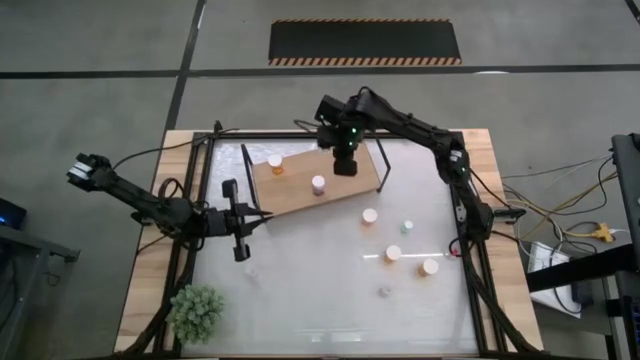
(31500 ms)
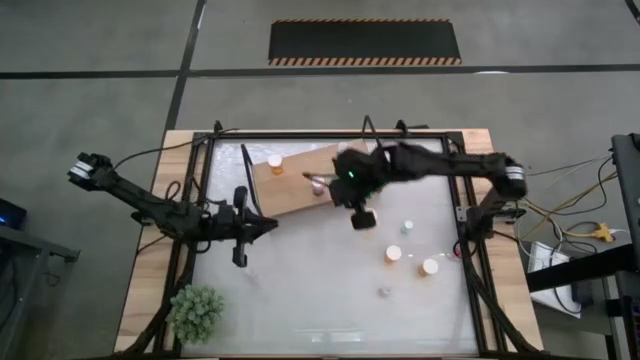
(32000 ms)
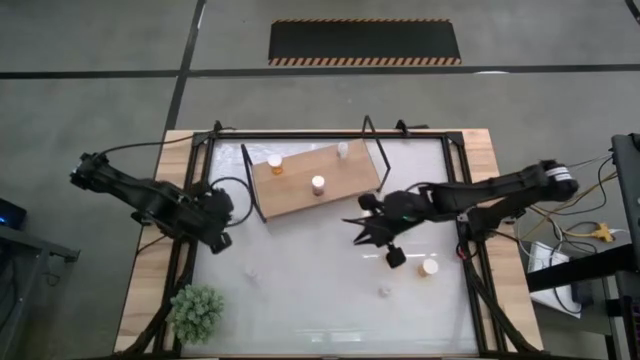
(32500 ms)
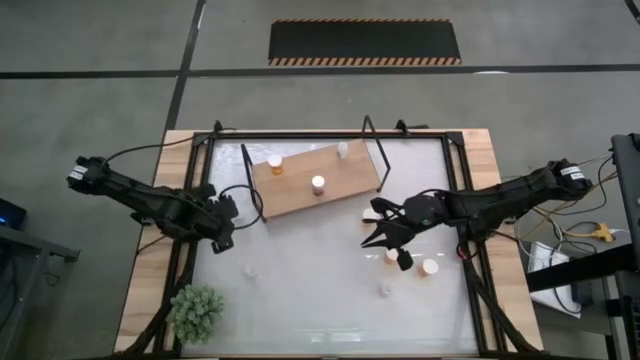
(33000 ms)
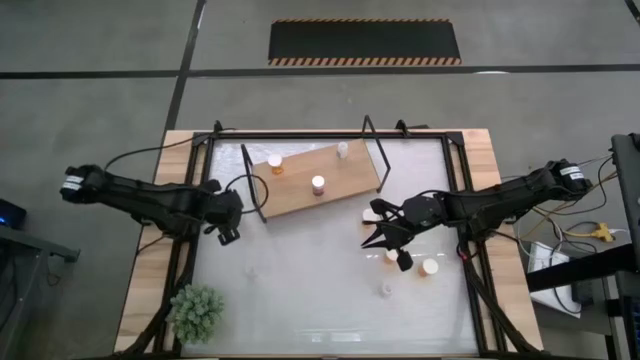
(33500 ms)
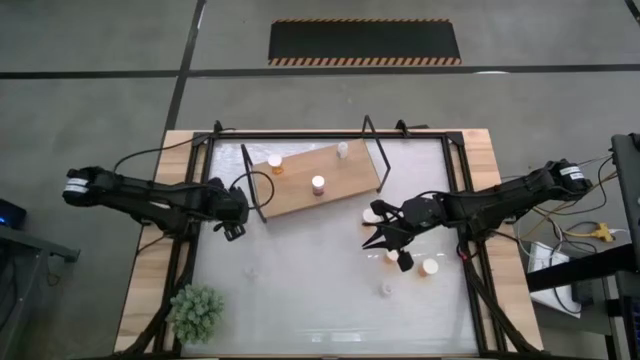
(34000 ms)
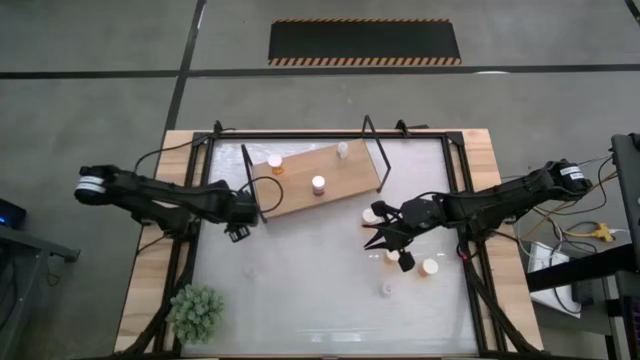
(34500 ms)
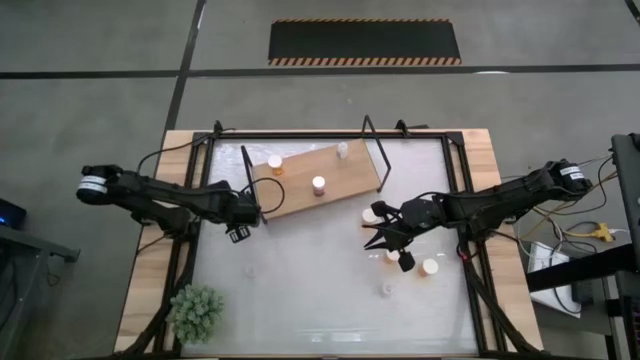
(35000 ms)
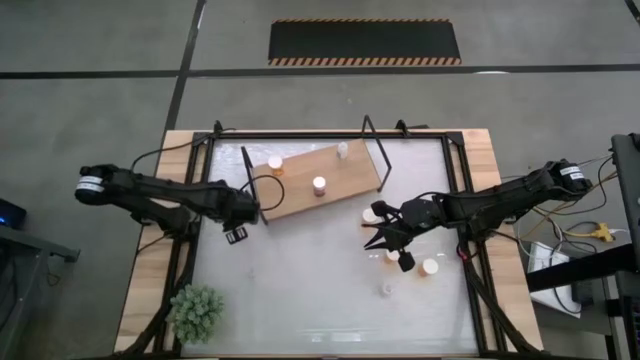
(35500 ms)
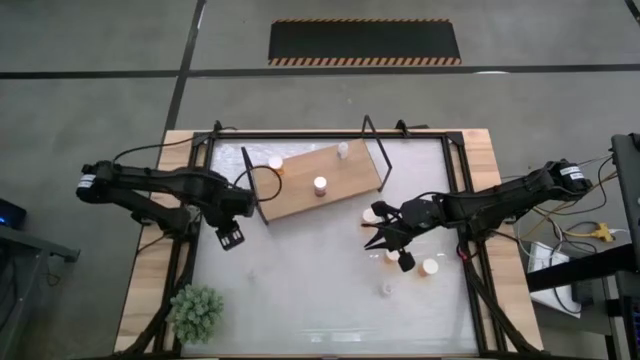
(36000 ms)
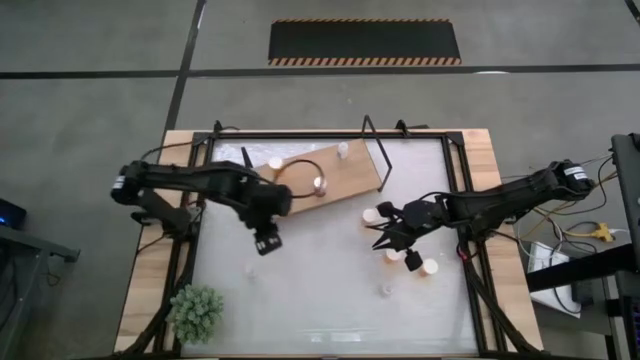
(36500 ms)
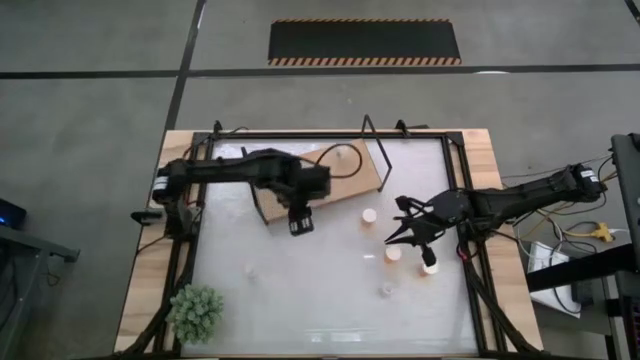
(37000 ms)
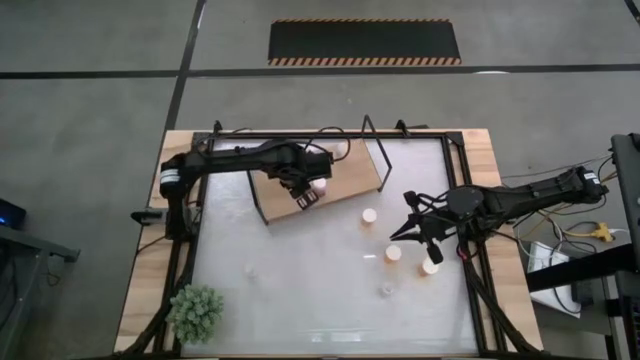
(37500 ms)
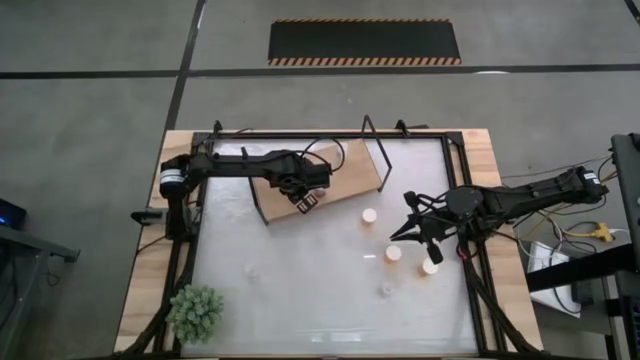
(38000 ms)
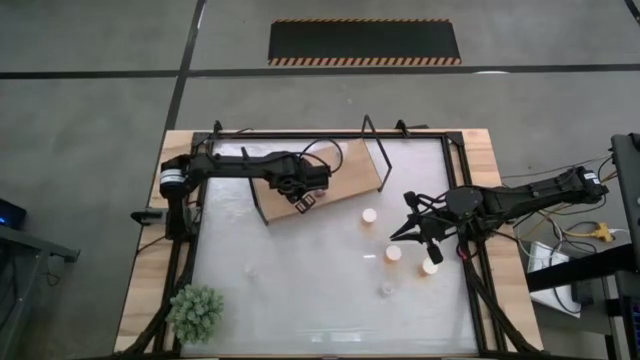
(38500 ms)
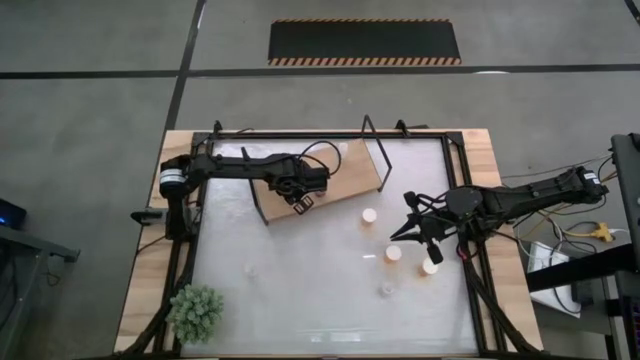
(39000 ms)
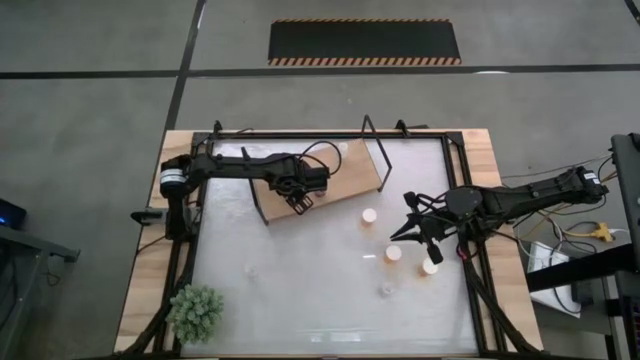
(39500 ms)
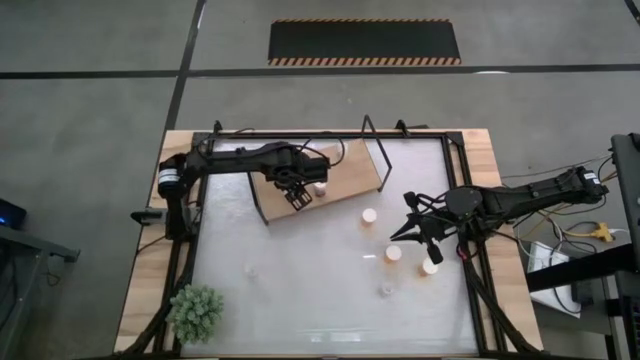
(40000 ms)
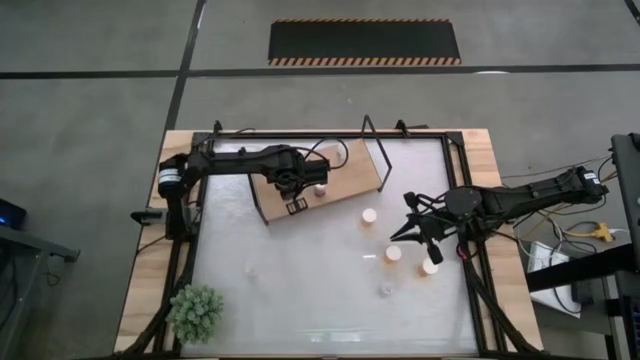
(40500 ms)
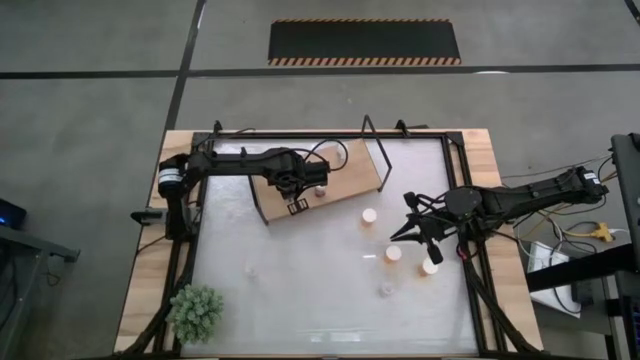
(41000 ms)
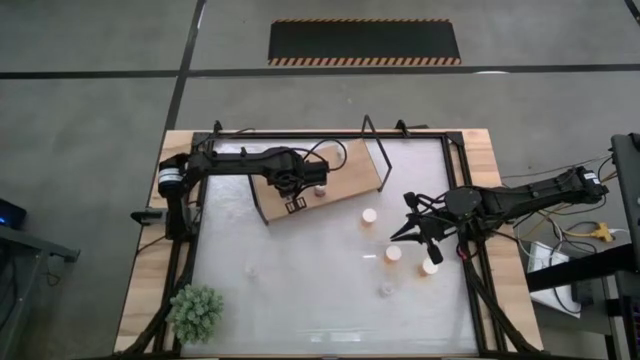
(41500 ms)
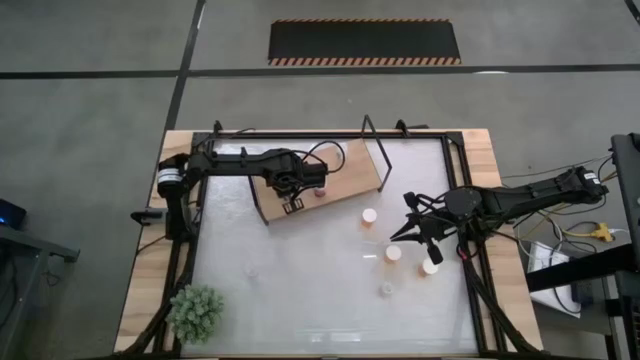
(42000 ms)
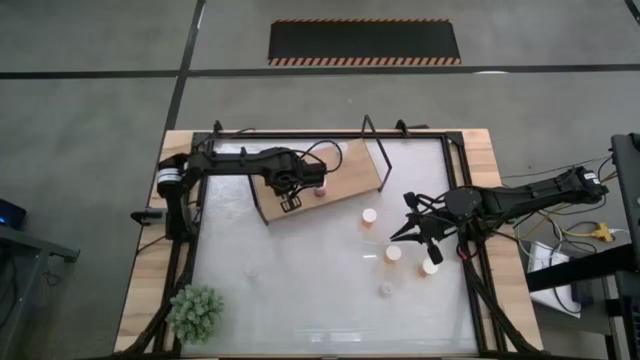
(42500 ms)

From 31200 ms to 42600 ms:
Task: Pick and place medicine bottles onto shelf by color
Put the yellow pill bottle on the shelf

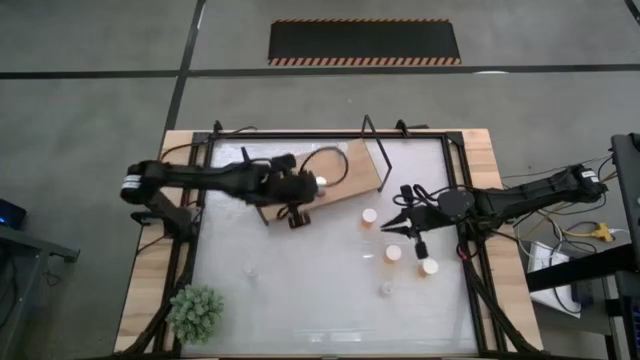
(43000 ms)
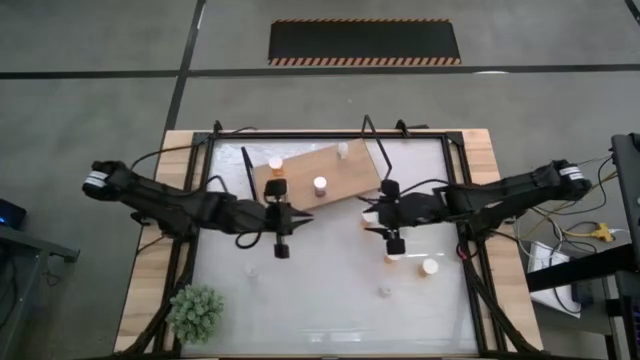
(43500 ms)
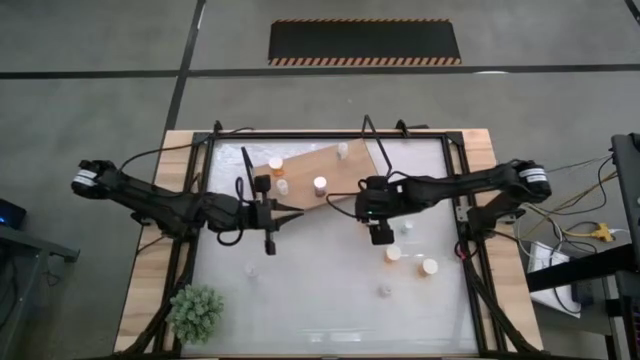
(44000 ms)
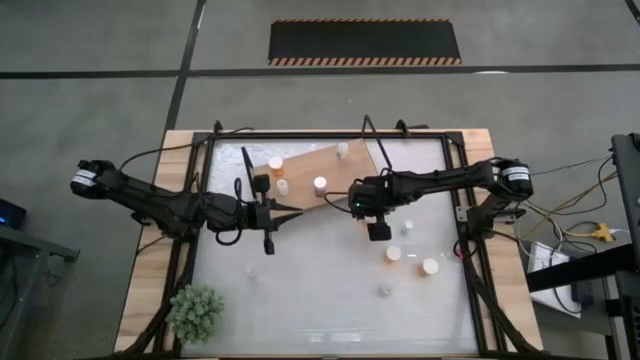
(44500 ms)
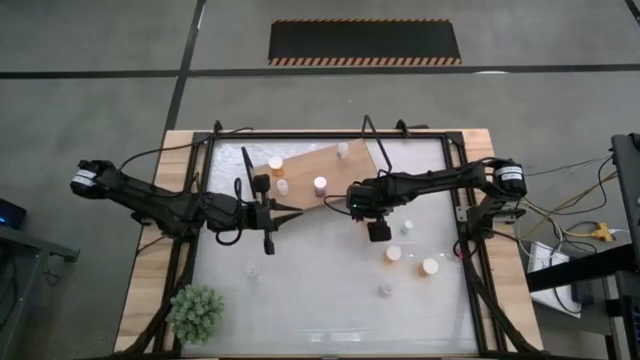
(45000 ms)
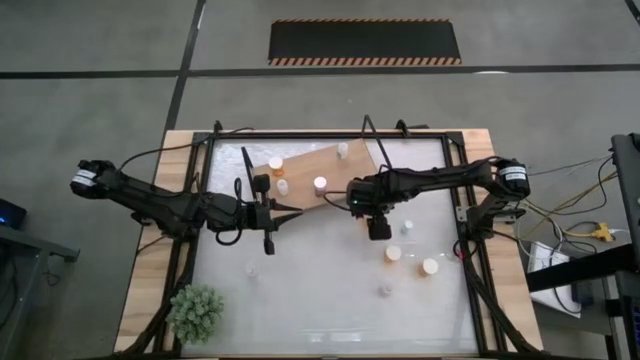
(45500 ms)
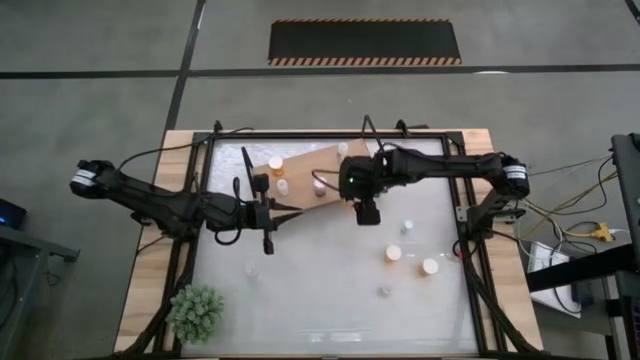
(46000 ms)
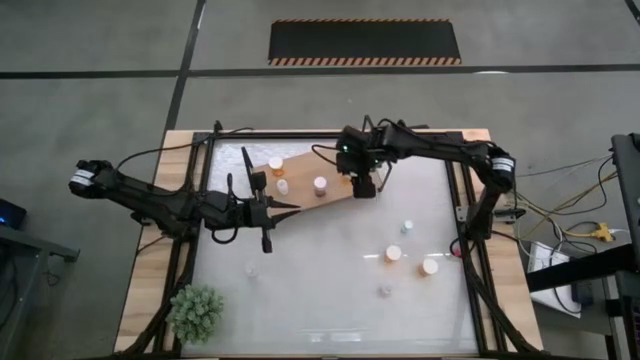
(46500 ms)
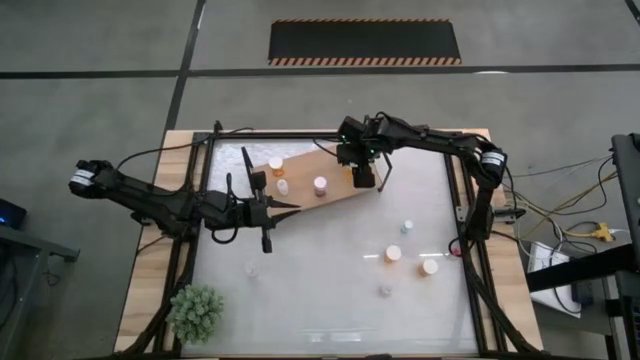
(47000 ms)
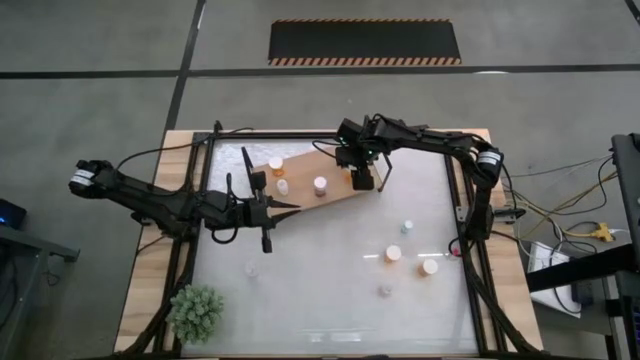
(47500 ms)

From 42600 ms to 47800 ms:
Put the top orange pill bottle on the shelf

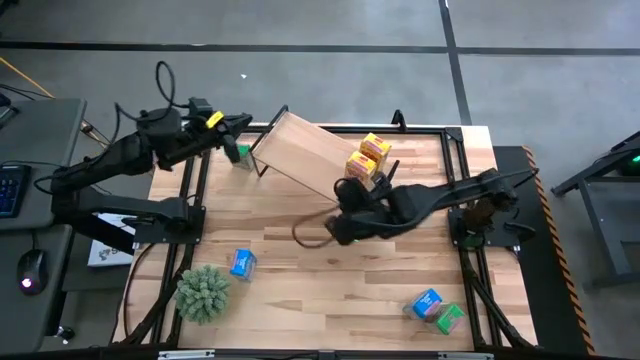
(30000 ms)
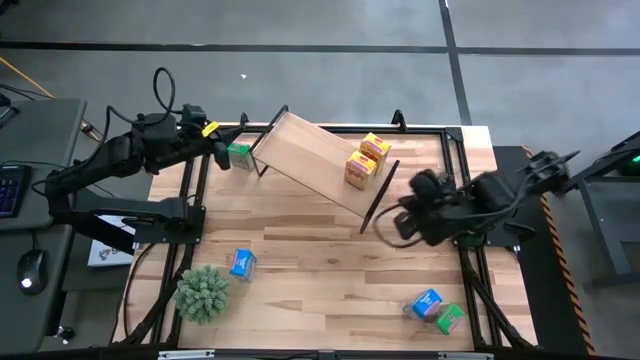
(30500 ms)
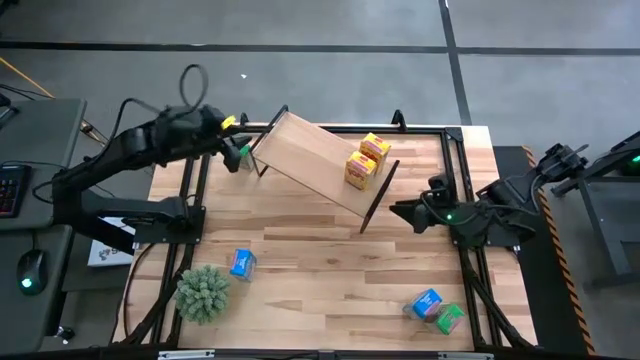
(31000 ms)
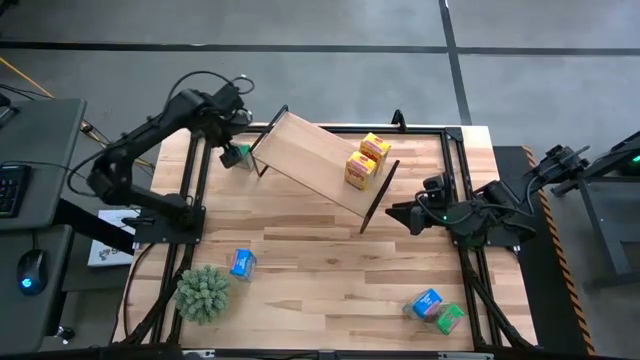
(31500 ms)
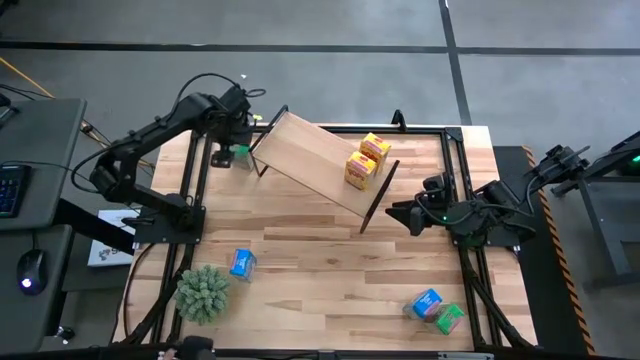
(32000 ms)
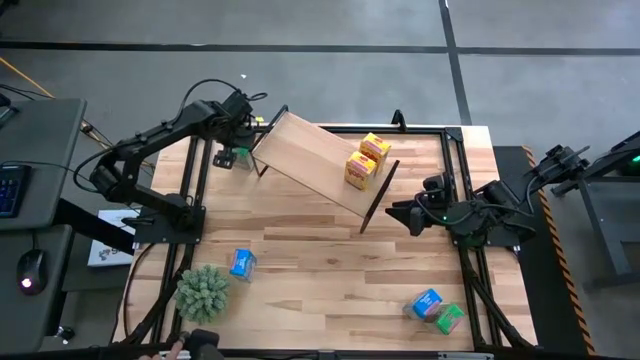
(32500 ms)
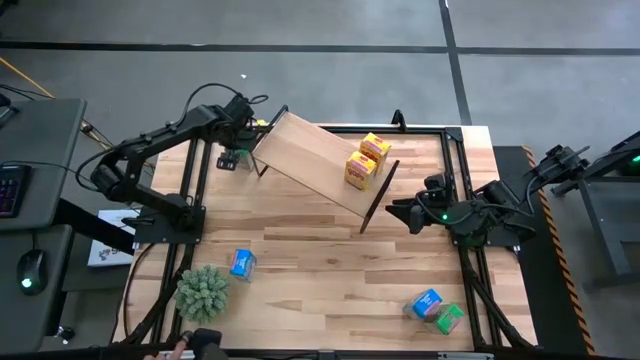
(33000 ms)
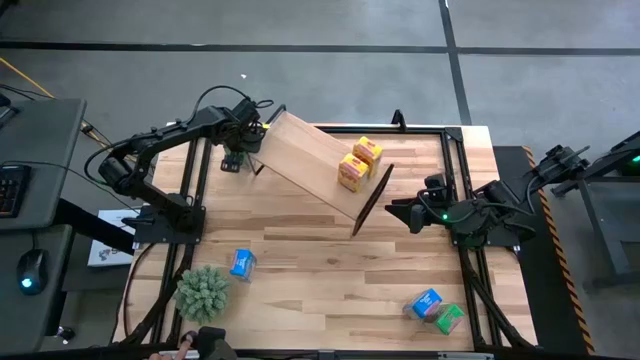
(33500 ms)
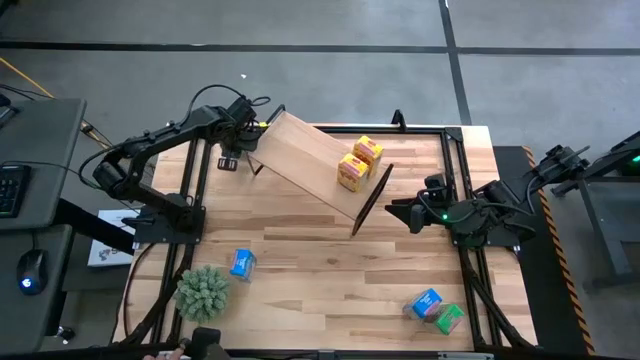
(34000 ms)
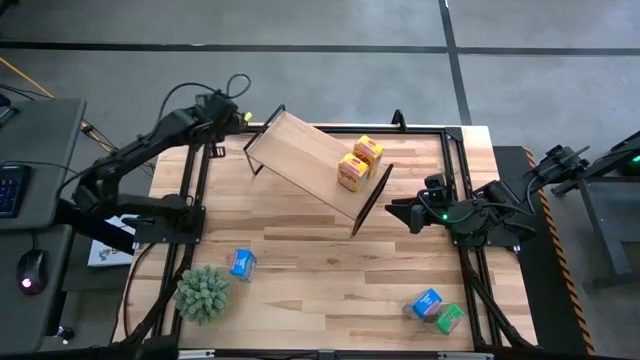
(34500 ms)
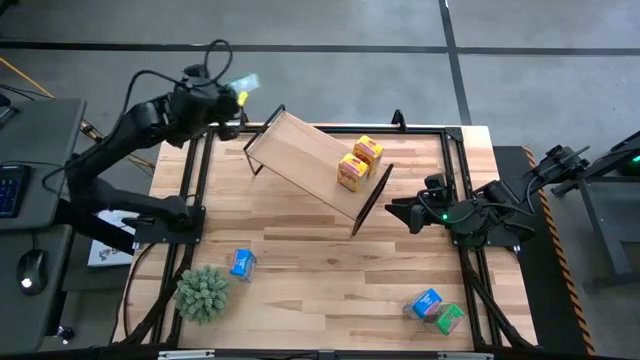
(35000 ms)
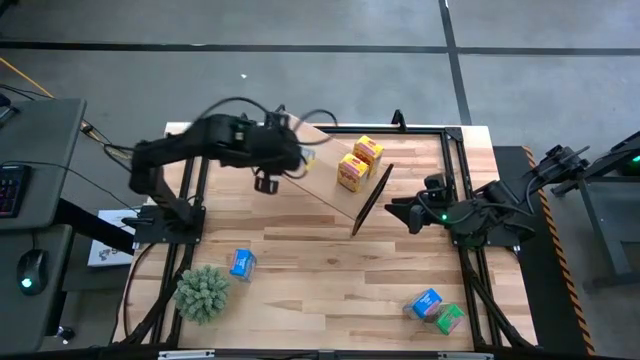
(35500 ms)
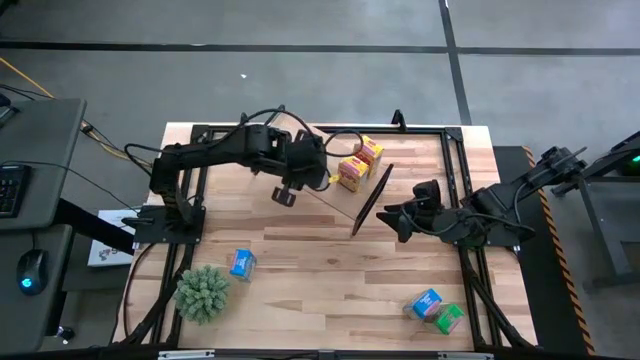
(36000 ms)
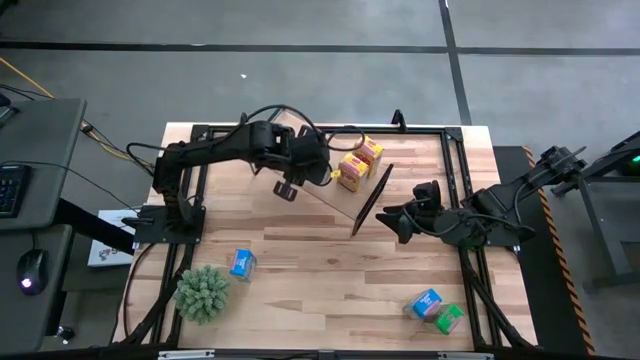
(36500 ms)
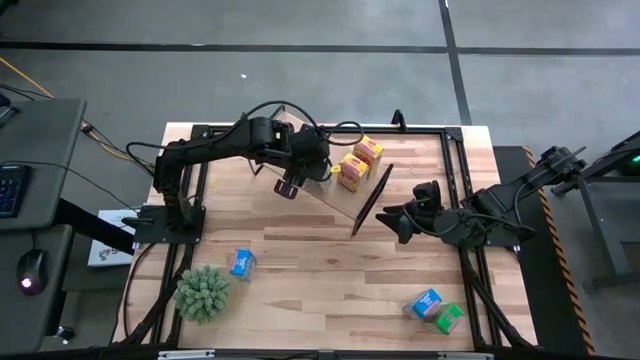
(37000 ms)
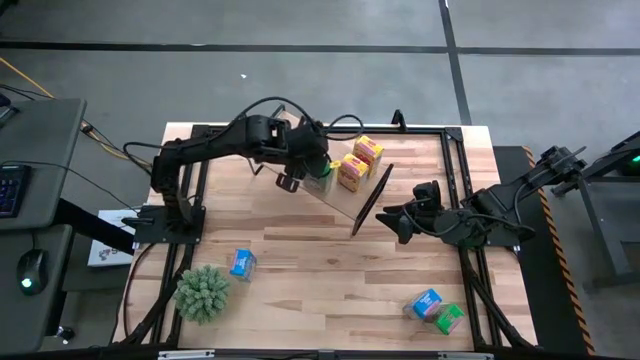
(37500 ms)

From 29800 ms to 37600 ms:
Task: Stack cereal on shelf
Put the top green cereal box on the shelf
